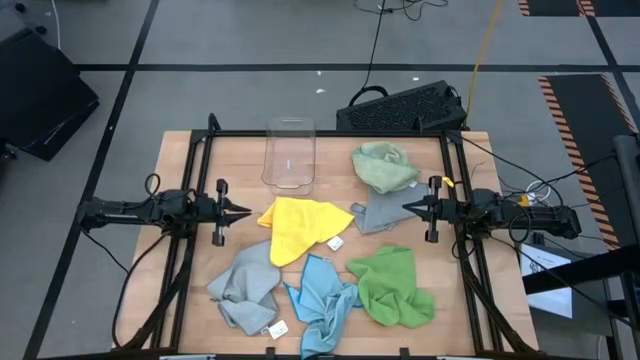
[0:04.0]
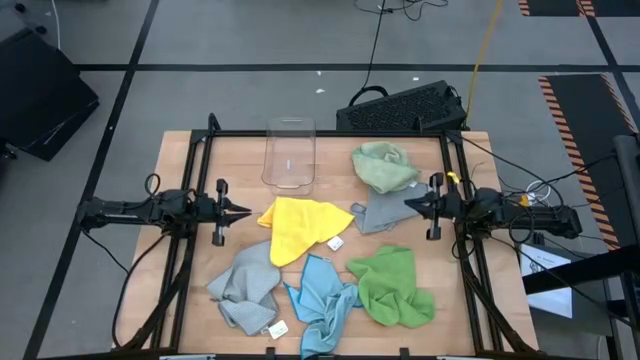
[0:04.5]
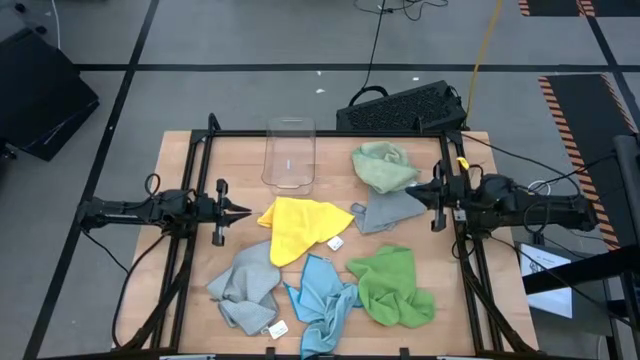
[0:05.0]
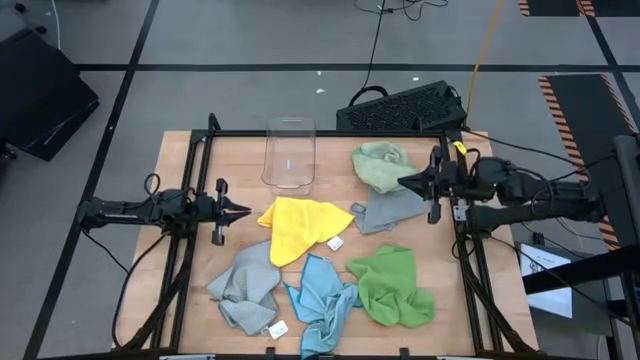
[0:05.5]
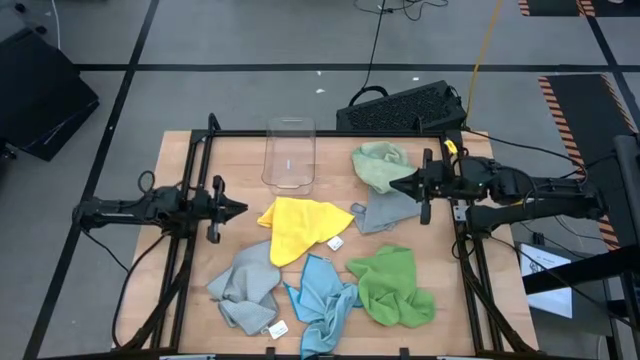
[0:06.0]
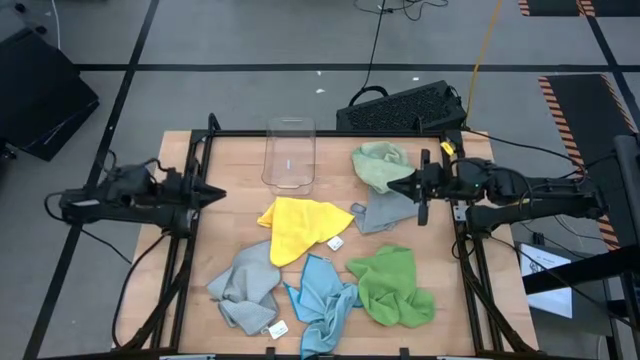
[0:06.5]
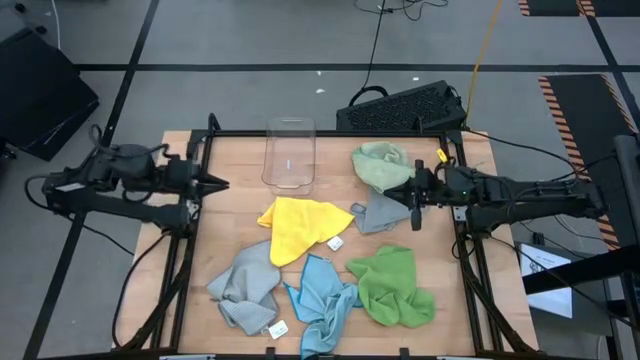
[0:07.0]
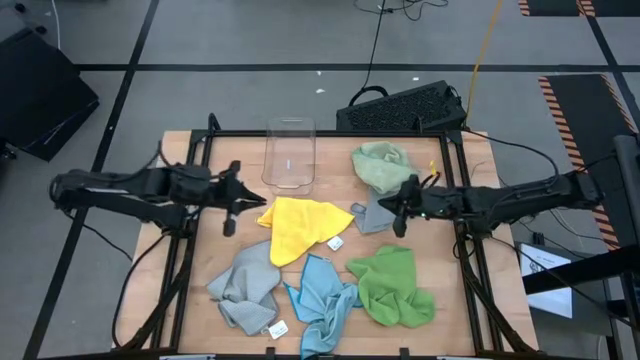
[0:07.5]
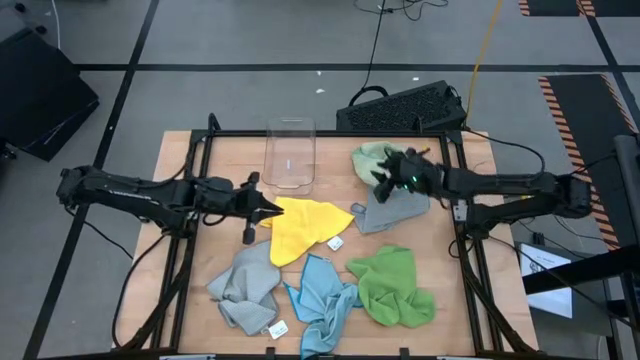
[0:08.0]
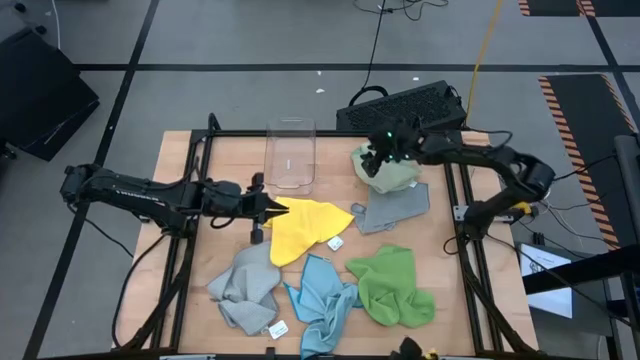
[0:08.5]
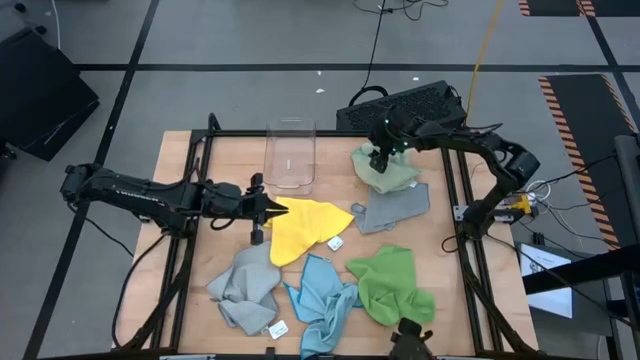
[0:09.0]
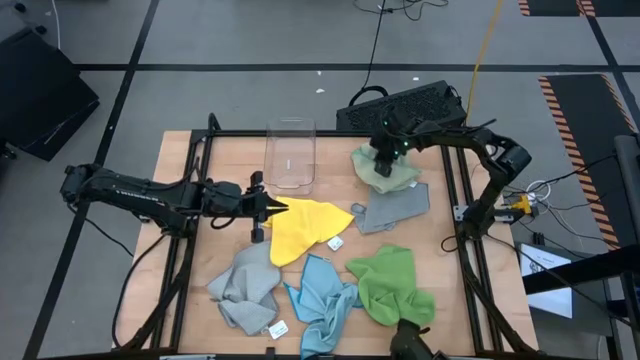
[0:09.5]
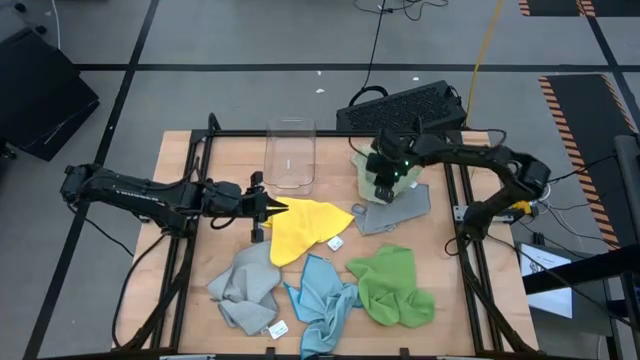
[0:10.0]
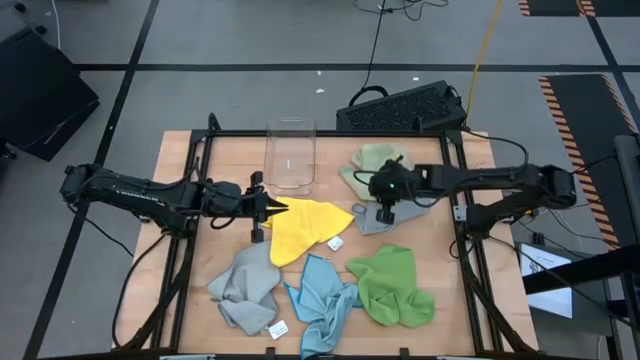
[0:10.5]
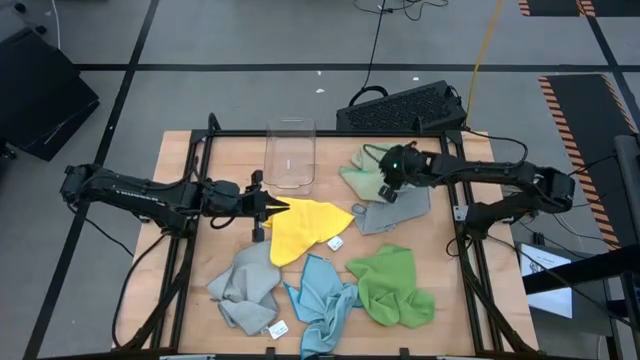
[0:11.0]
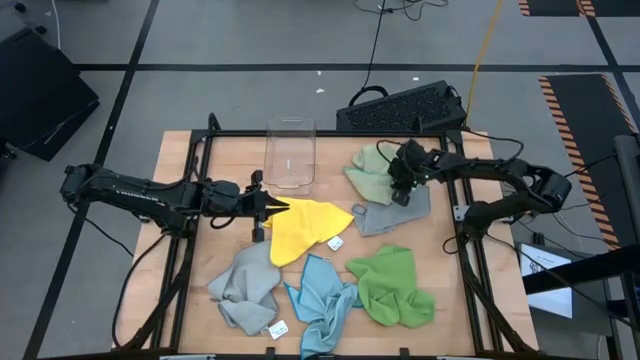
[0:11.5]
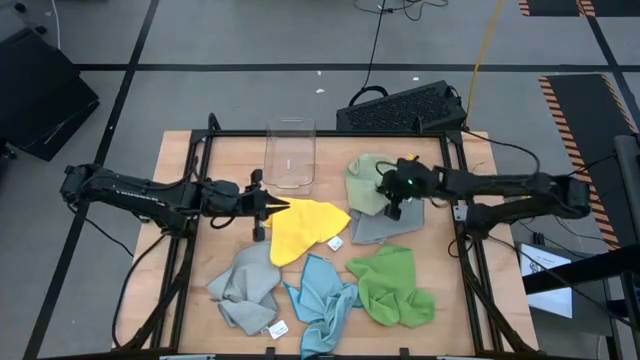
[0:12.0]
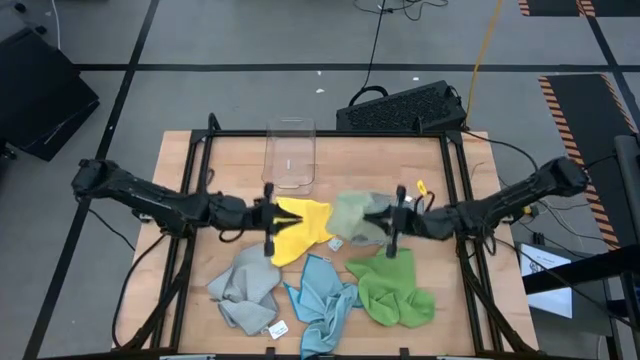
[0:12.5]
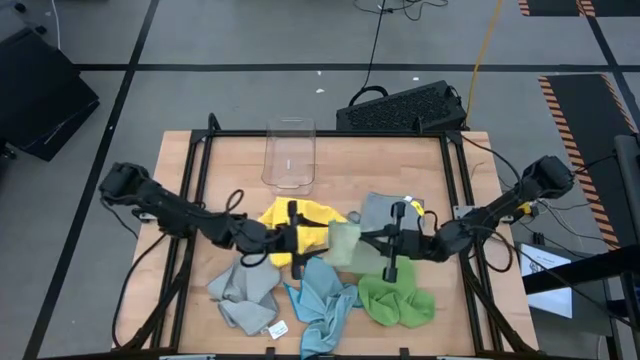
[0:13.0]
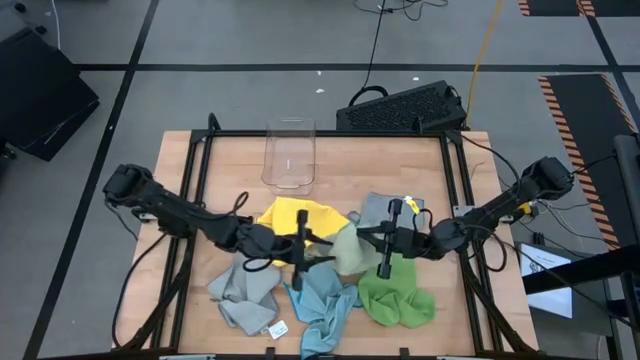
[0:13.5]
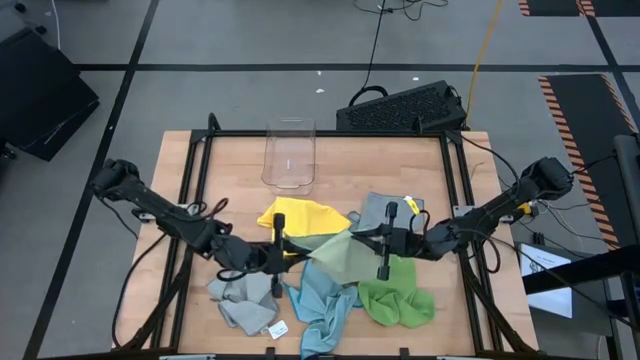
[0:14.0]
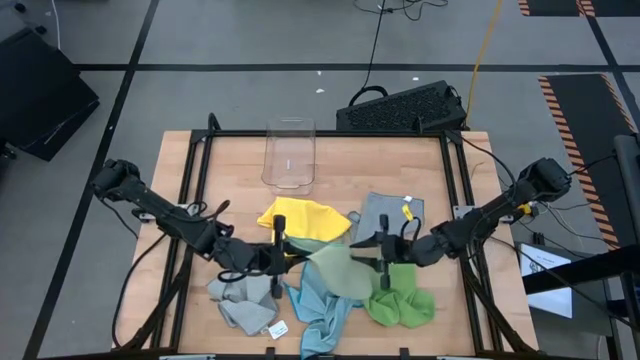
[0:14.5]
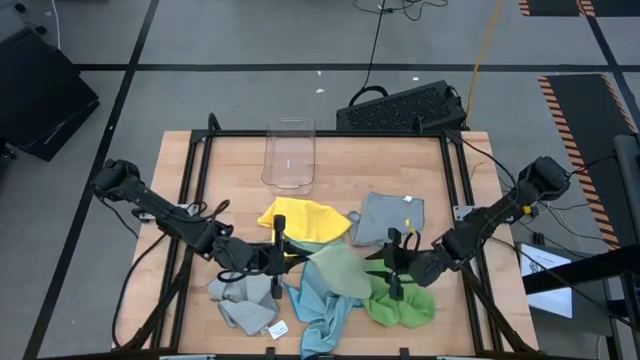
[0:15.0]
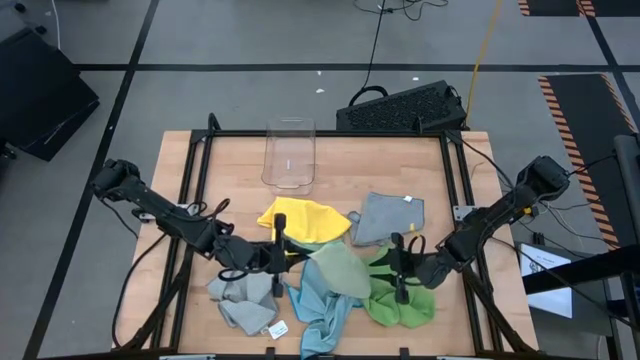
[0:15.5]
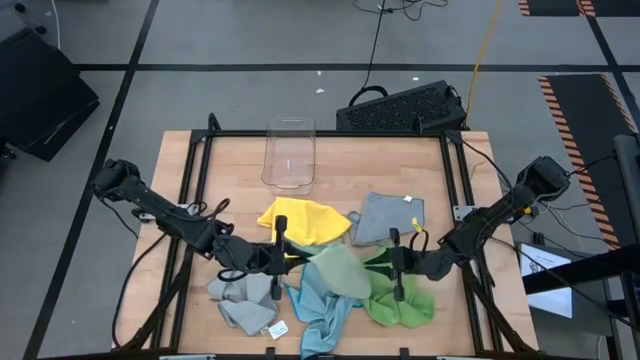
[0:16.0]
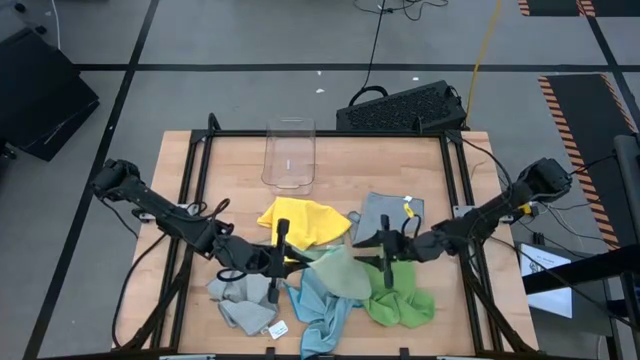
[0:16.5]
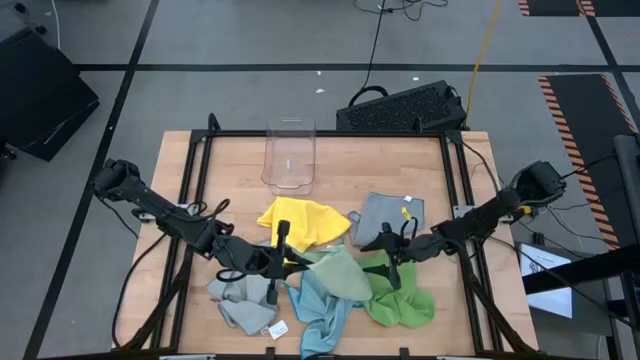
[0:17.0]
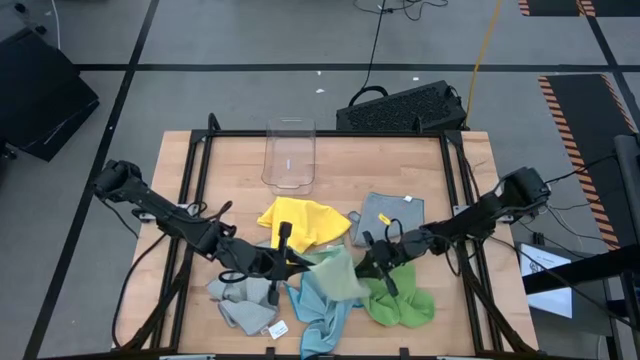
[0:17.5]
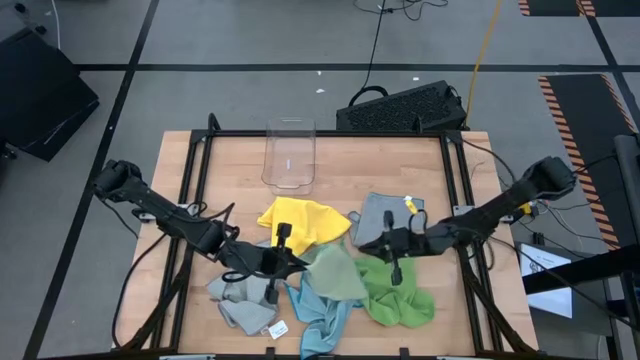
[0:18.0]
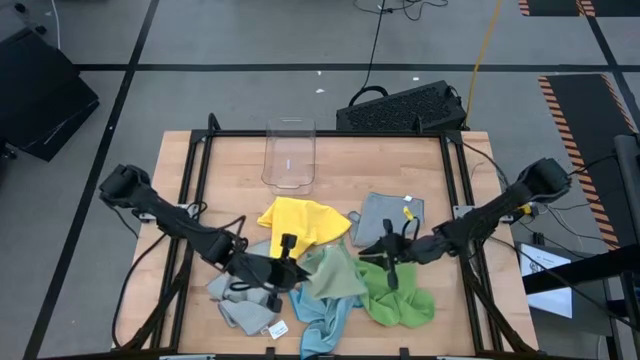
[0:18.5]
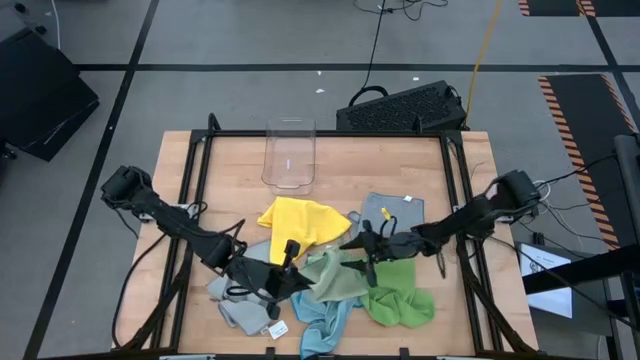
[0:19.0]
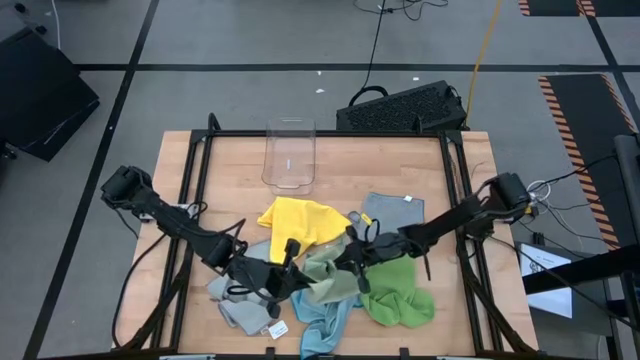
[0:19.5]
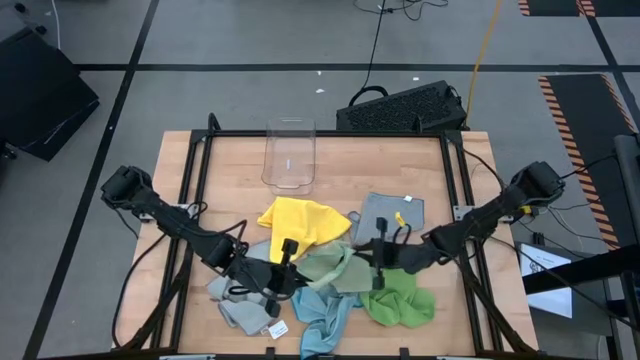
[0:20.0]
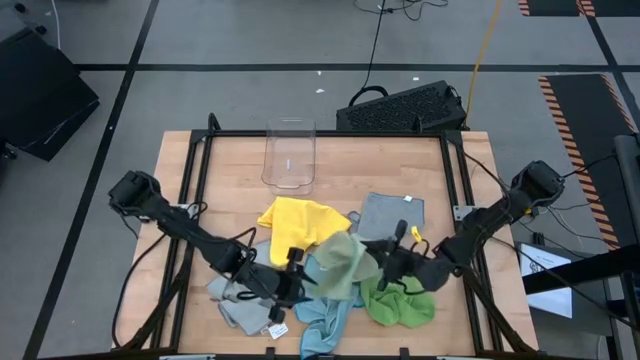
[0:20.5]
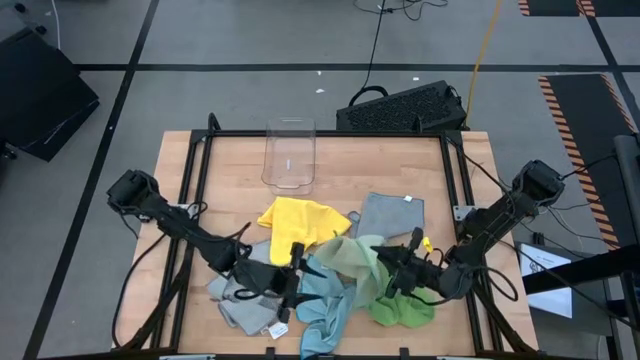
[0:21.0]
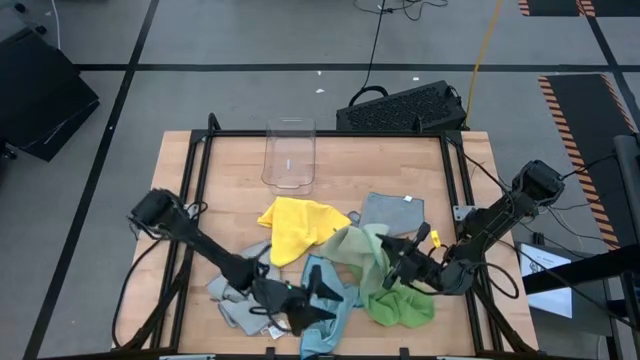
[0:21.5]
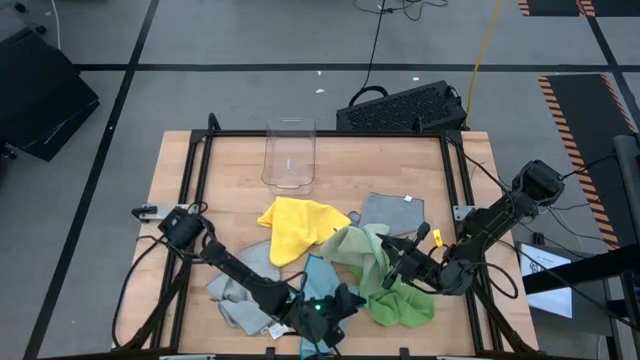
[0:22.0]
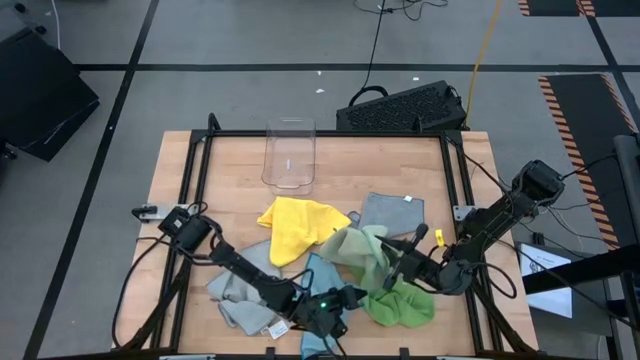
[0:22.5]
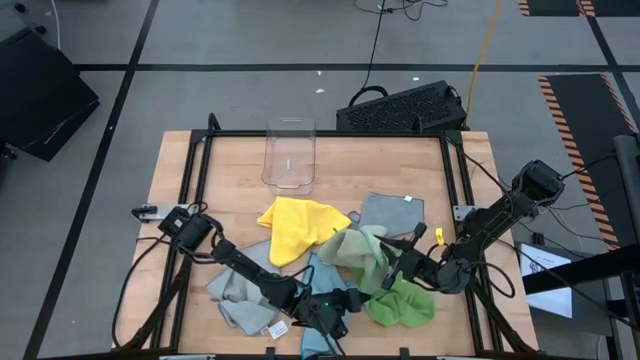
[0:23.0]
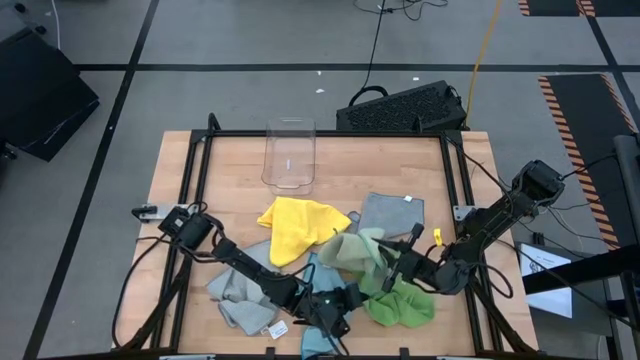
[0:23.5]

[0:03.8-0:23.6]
Task: Fold microfiber towels
Fold the light green microfiber cloth
